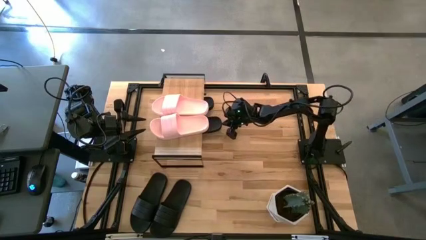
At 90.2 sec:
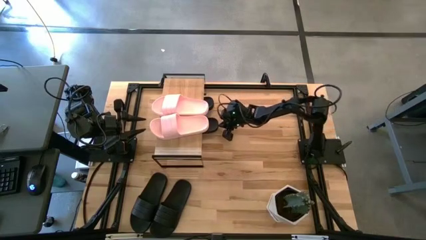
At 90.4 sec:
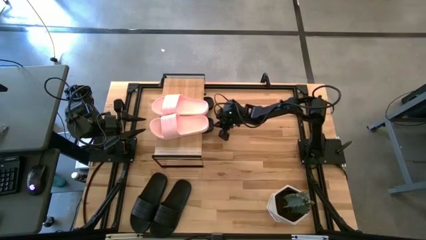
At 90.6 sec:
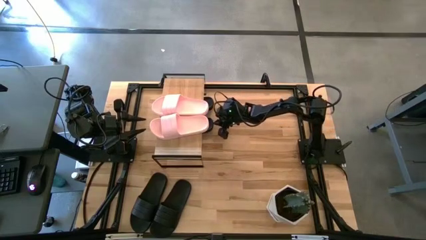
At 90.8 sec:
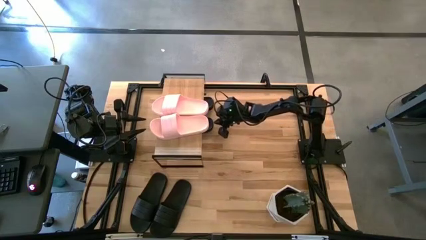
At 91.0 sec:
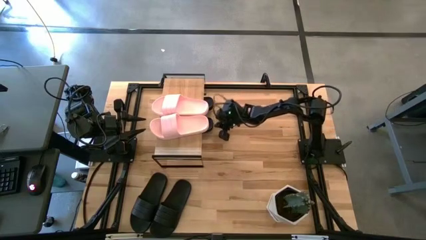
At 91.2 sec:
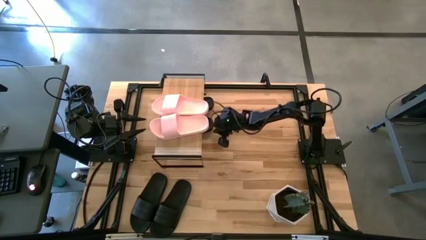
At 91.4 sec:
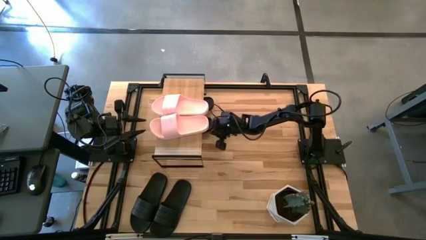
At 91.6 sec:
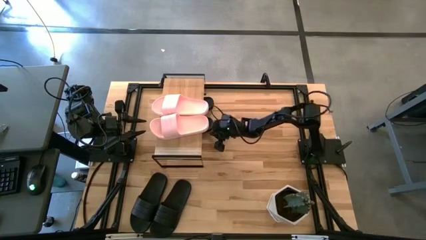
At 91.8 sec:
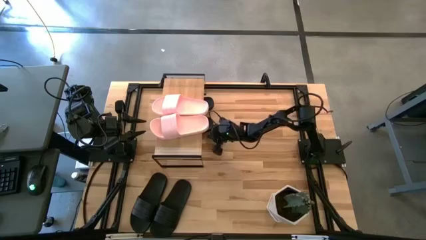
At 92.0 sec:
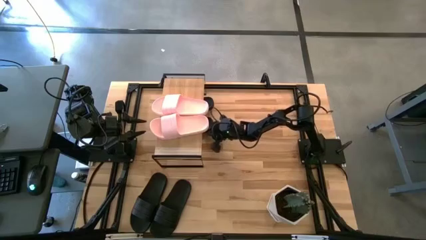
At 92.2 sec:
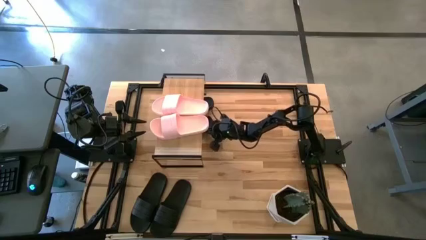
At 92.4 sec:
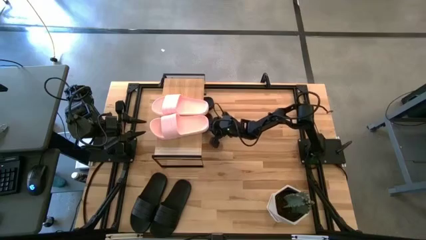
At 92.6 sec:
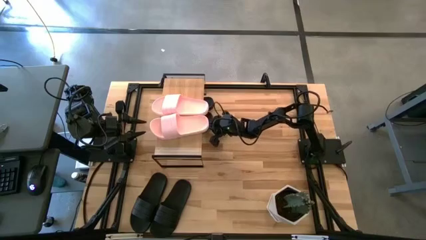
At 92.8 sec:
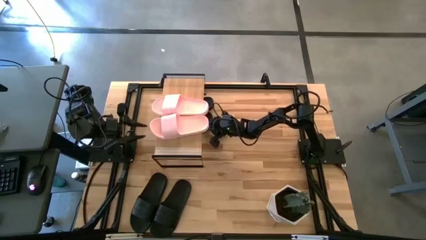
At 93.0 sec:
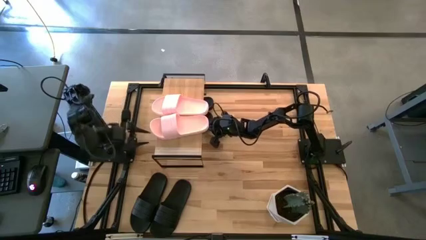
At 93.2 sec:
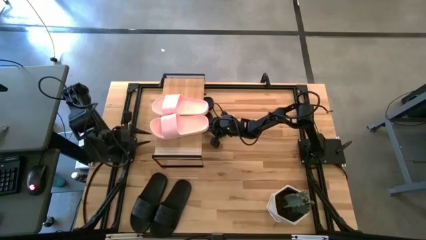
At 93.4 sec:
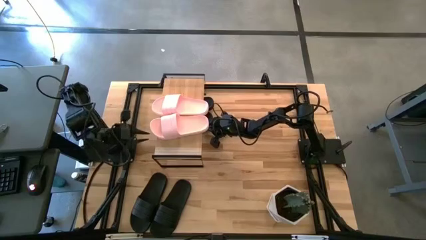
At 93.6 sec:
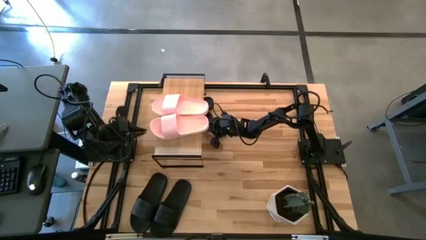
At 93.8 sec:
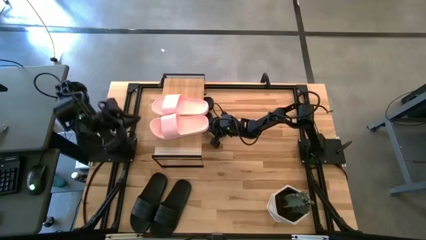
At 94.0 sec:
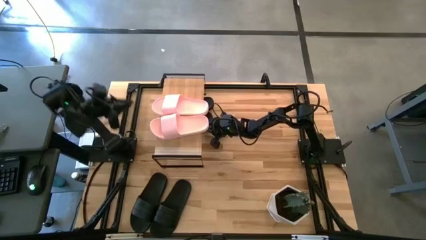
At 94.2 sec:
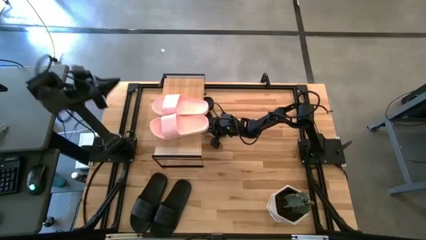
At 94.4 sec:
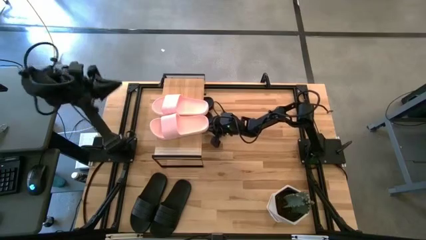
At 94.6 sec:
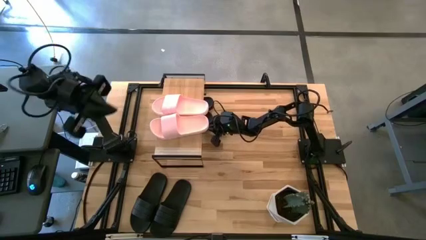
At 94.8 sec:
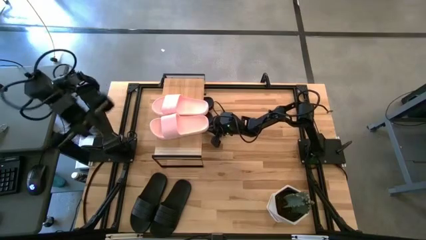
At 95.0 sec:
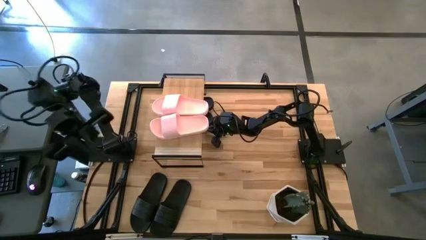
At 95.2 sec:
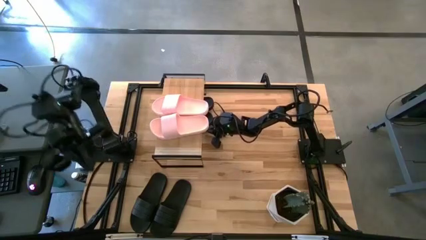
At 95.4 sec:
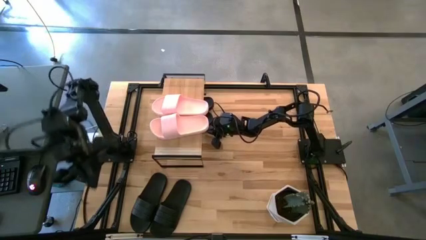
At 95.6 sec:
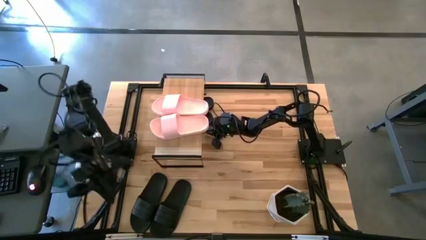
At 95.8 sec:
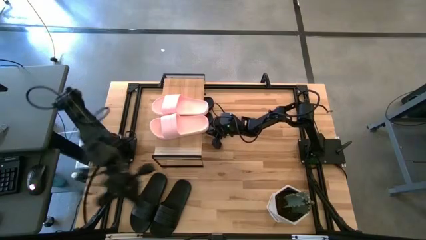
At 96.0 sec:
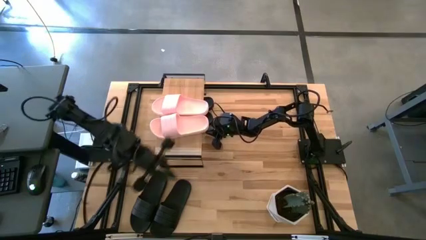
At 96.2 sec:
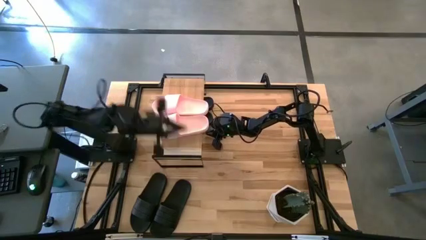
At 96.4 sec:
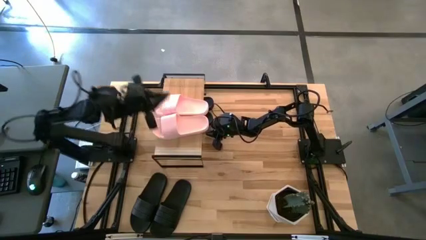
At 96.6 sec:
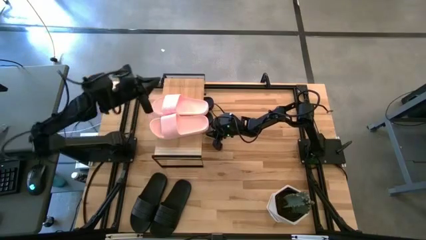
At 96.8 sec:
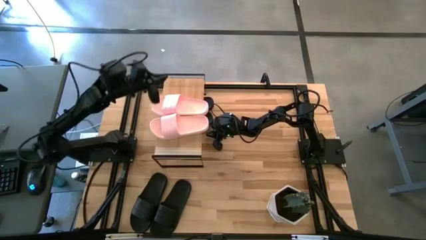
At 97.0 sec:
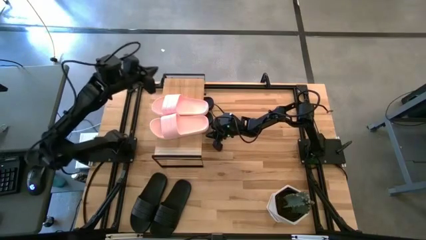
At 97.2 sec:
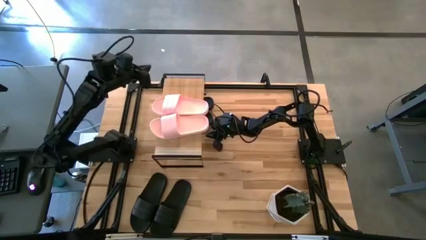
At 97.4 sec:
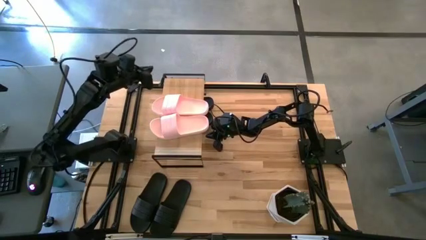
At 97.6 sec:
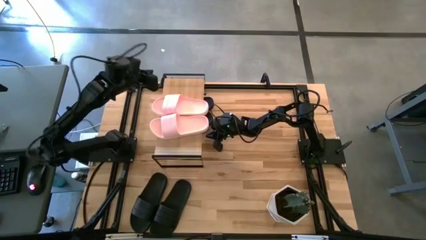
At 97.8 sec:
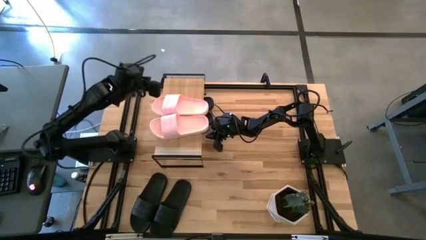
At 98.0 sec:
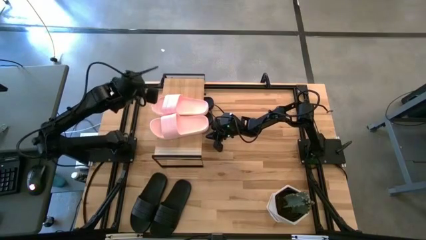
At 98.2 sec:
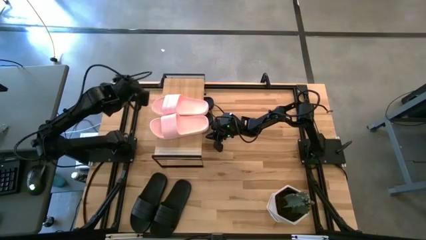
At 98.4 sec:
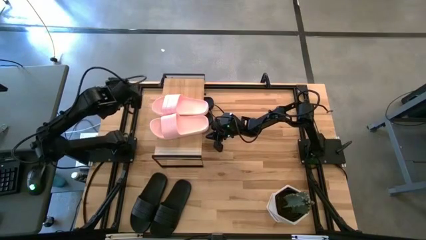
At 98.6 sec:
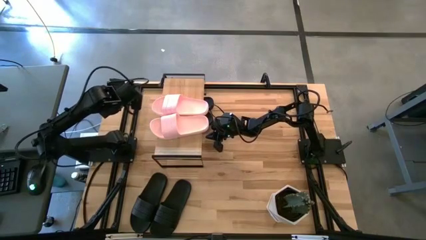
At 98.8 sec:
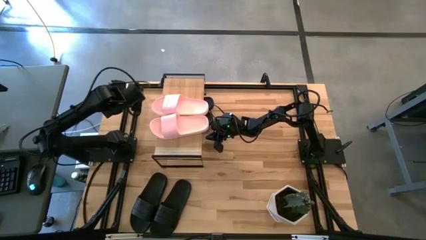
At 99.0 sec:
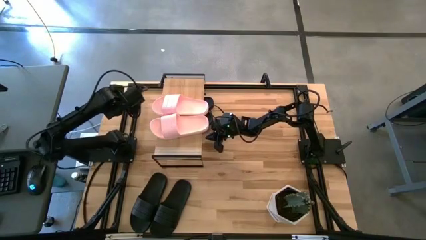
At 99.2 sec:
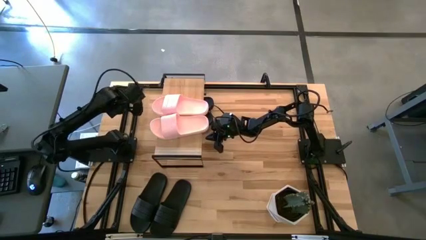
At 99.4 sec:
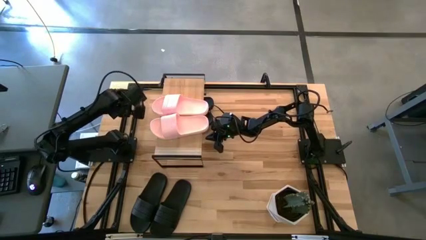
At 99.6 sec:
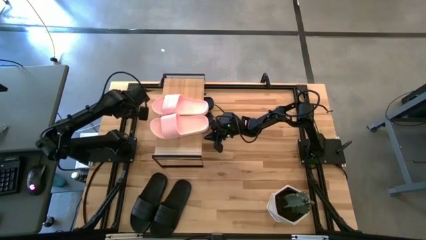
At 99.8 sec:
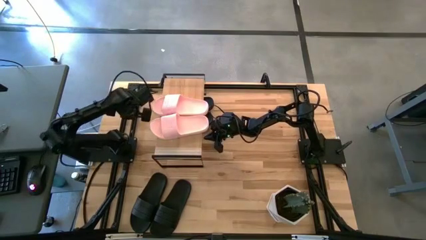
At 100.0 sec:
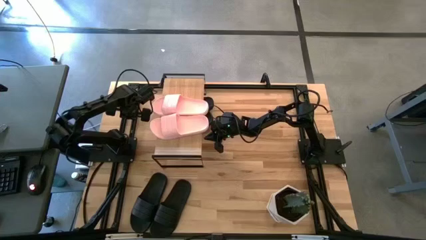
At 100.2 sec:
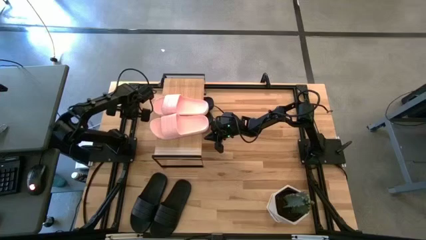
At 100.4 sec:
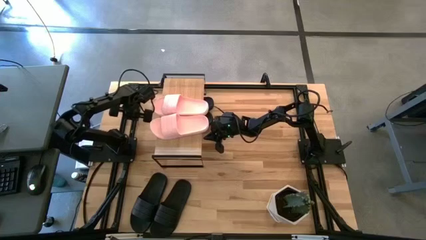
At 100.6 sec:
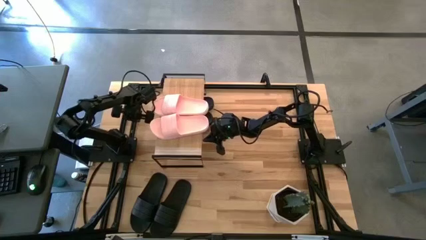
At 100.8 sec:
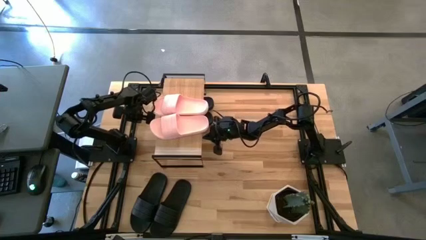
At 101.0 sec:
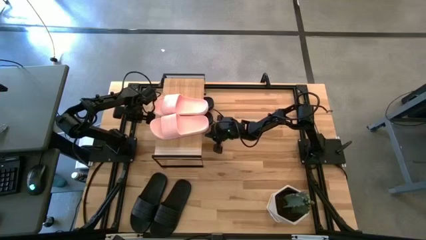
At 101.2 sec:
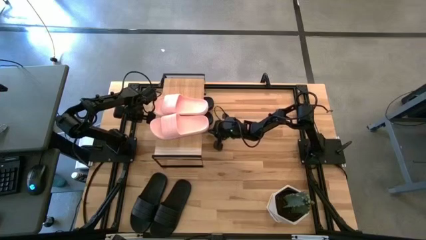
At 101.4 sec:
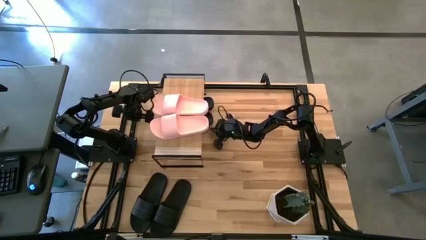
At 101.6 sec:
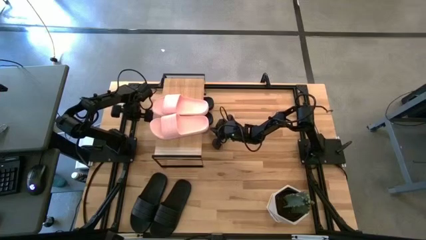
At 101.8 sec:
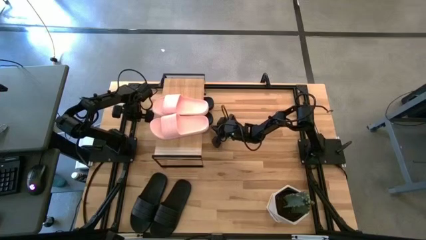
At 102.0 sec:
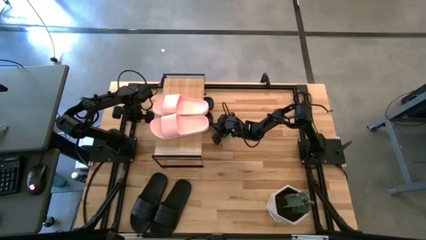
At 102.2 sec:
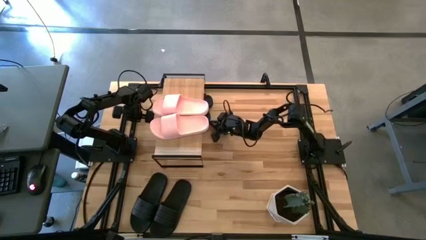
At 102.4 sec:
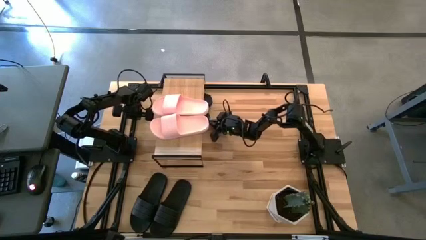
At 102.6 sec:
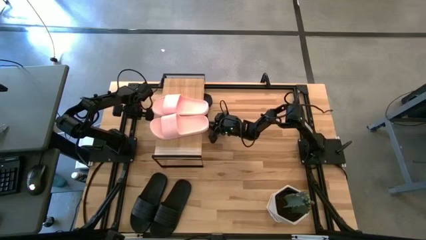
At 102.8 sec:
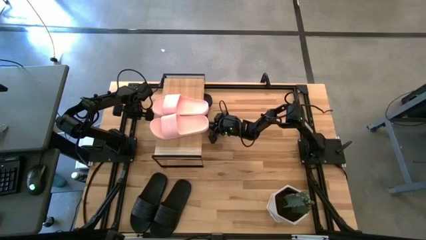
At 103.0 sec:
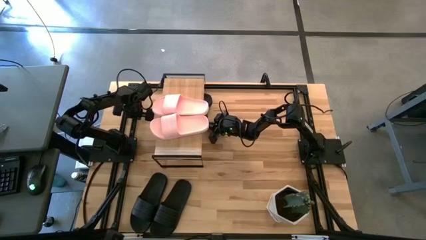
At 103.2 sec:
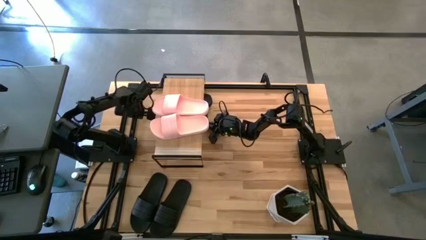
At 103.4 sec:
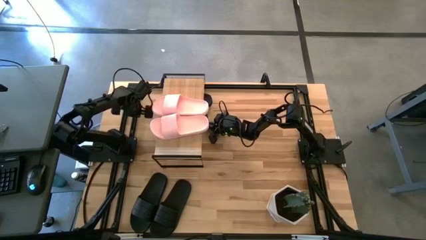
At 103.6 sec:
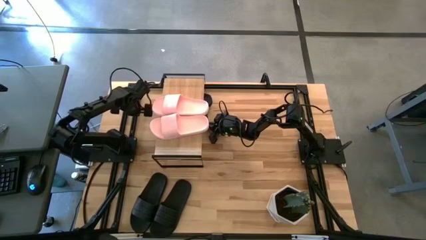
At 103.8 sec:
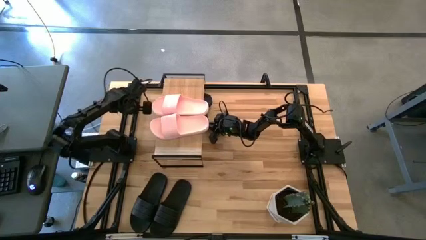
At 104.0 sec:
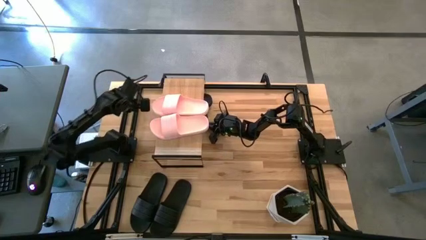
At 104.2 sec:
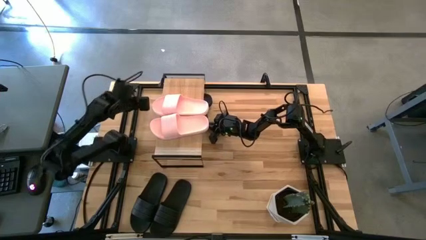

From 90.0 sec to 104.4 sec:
Task: Pick and place slides into the shelf
Put the black slide under the shelf
